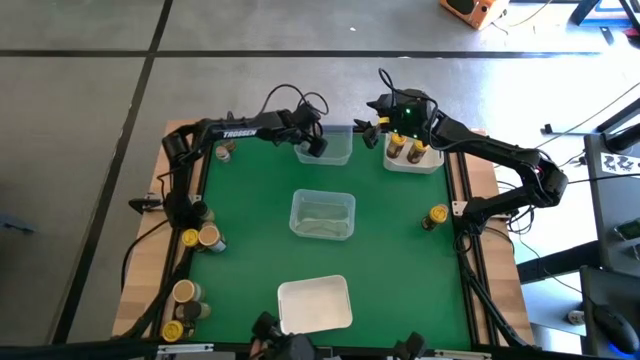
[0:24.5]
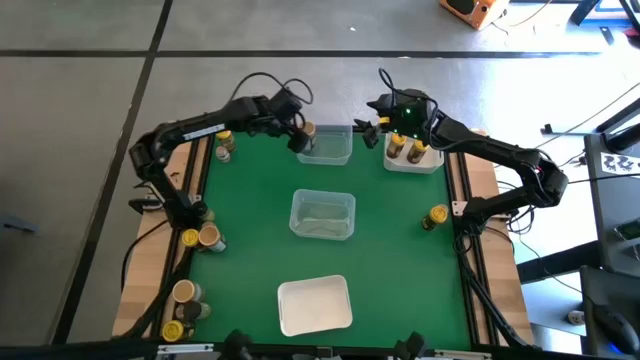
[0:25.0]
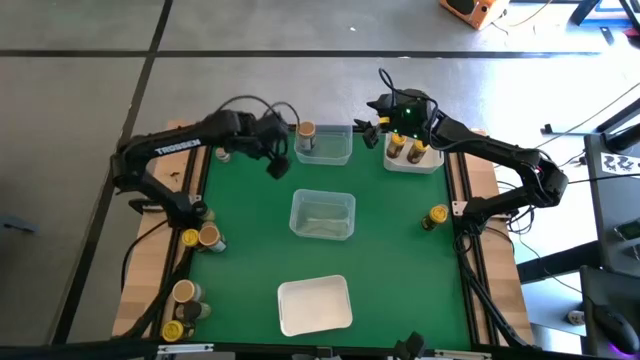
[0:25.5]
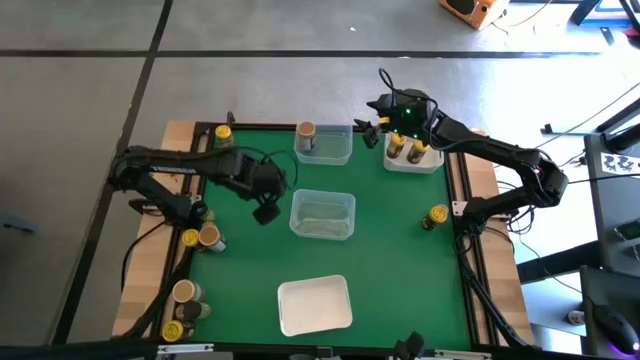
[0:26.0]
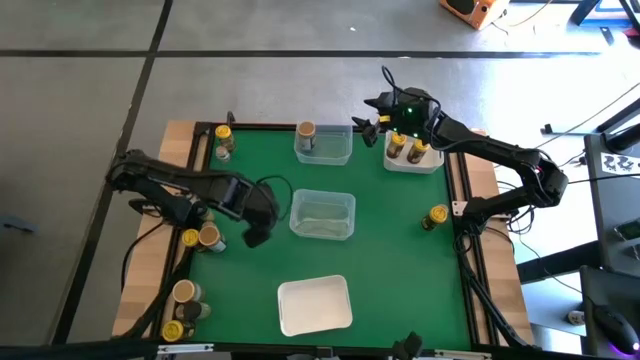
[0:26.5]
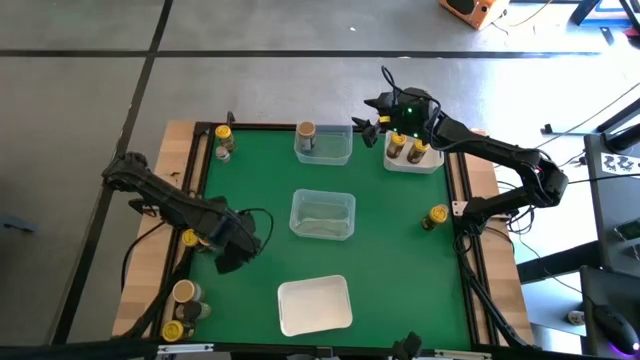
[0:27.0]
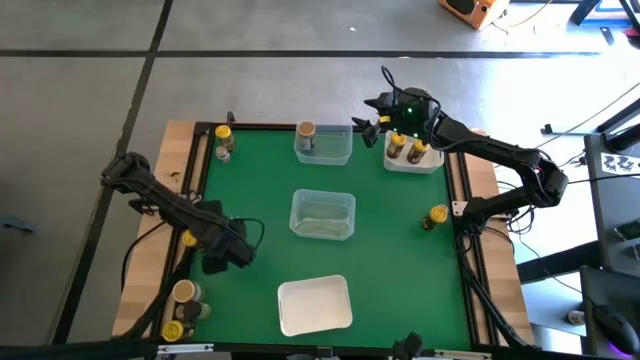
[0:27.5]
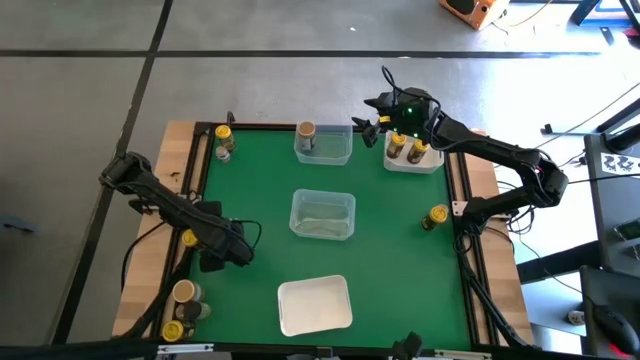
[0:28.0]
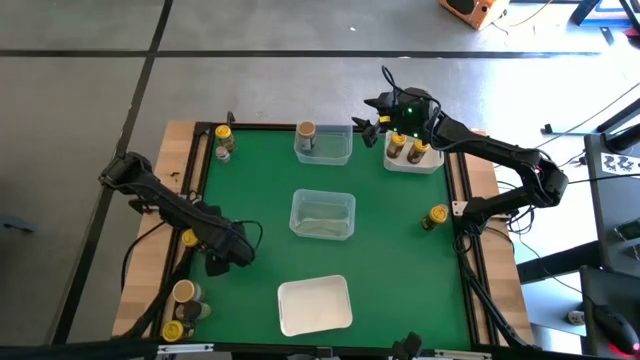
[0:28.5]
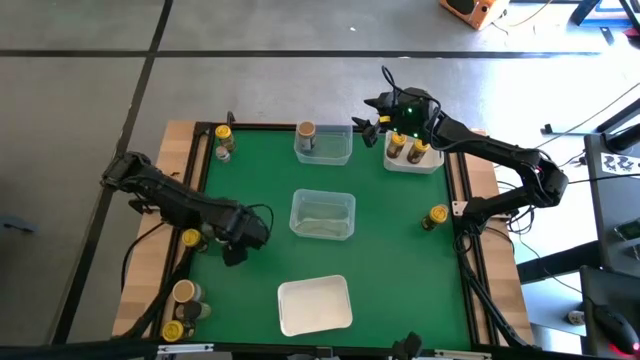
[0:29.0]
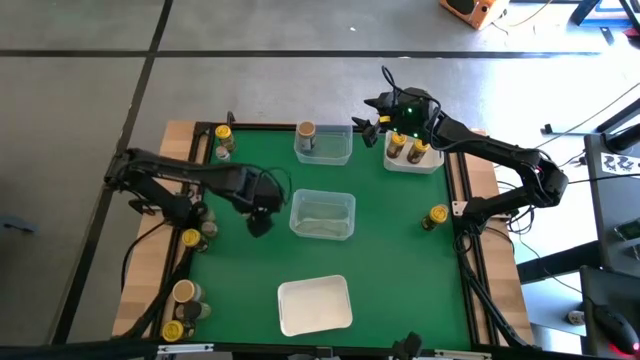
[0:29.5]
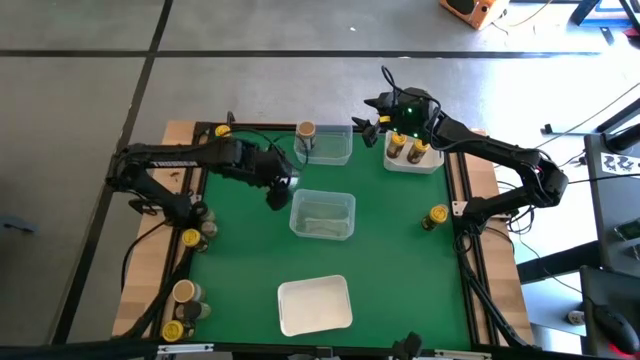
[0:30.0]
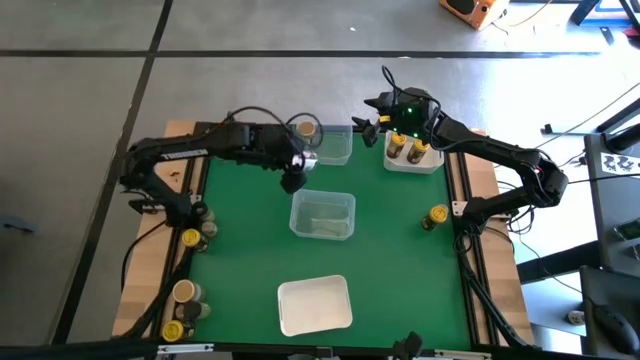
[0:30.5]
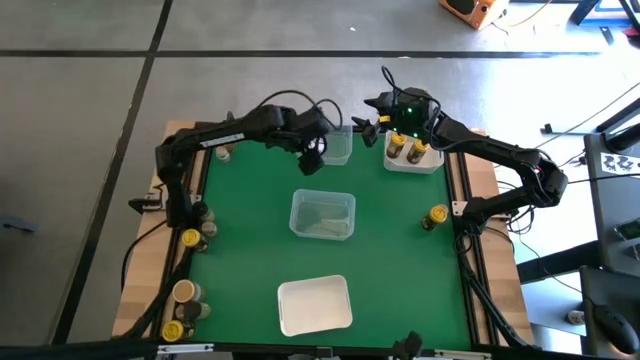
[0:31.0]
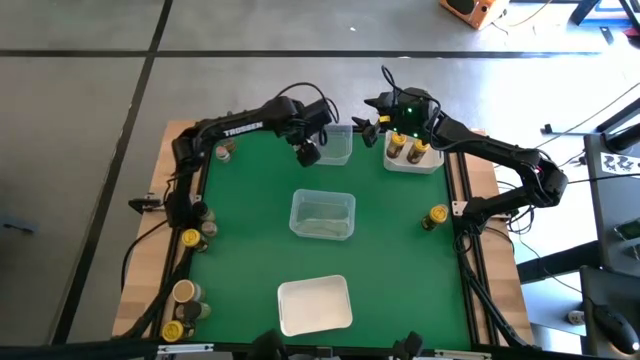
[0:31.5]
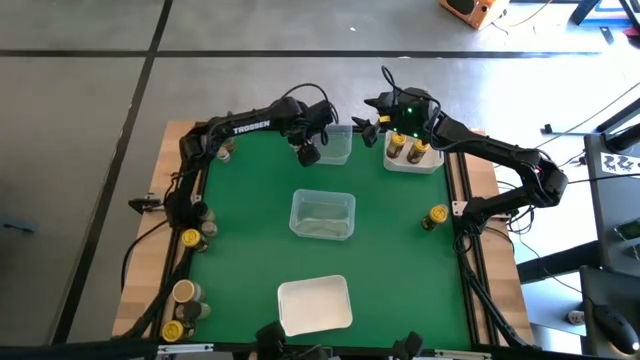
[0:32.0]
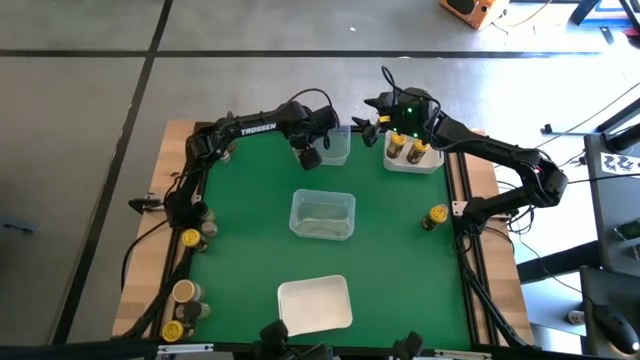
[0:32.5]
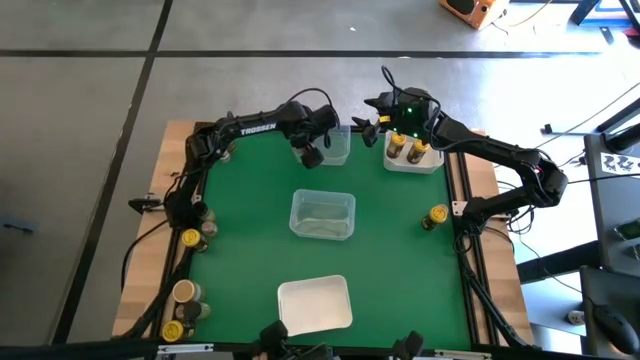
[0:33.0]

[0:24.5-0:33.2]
Task: Sort spices by type
Put the brown seasoning bottle into the top transparent bin

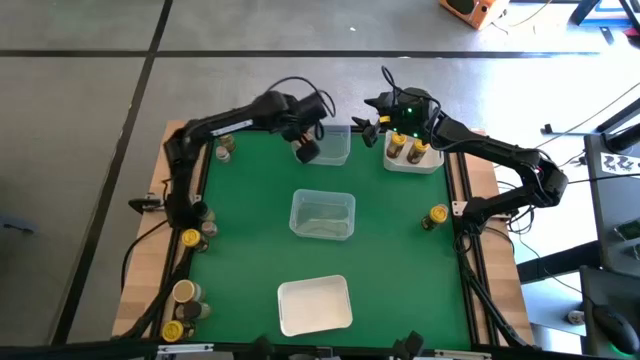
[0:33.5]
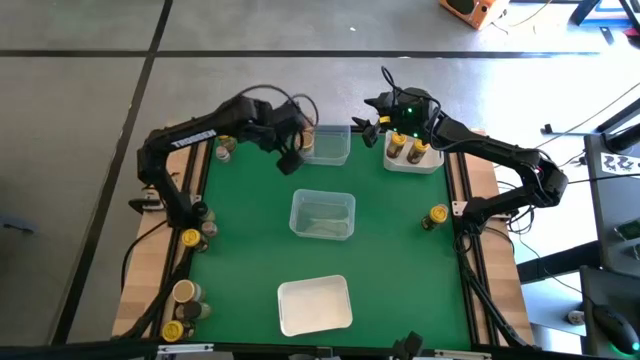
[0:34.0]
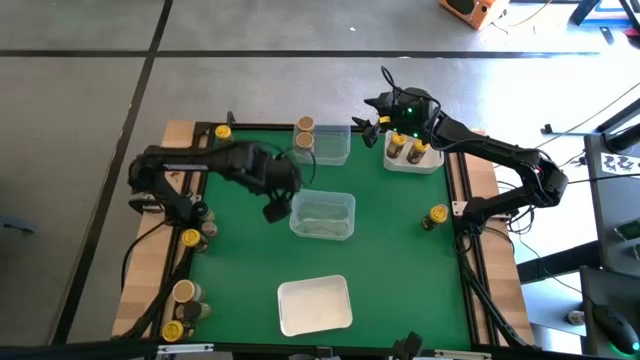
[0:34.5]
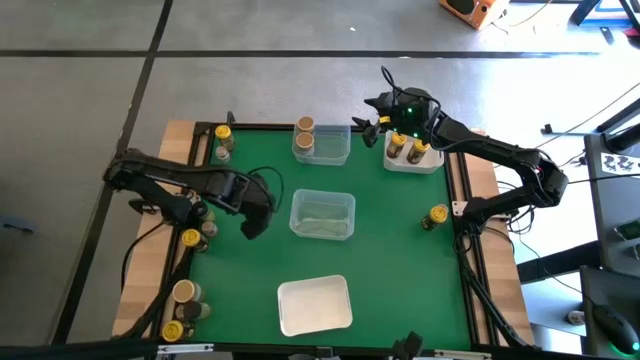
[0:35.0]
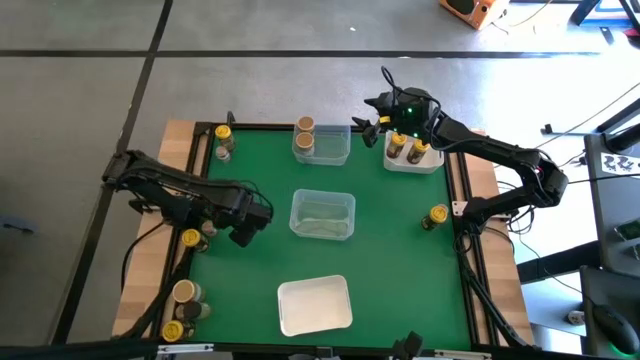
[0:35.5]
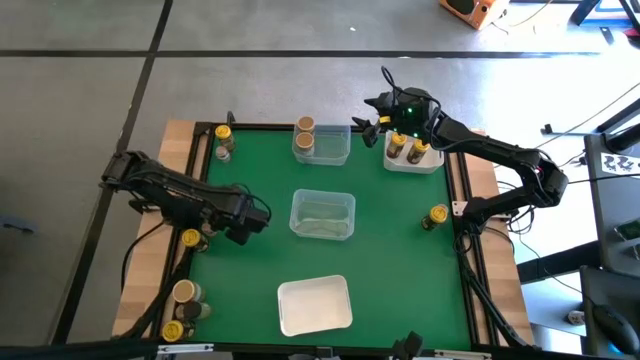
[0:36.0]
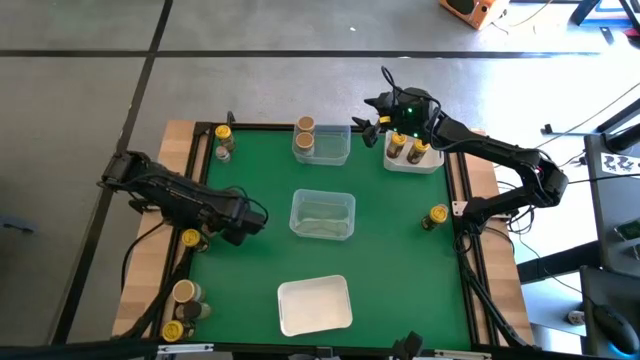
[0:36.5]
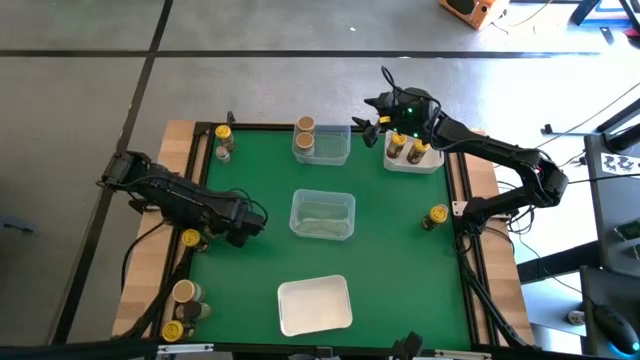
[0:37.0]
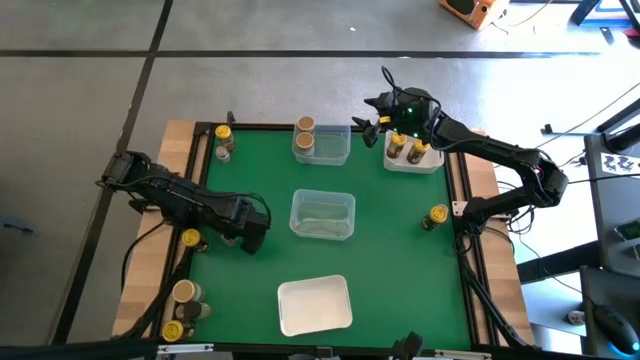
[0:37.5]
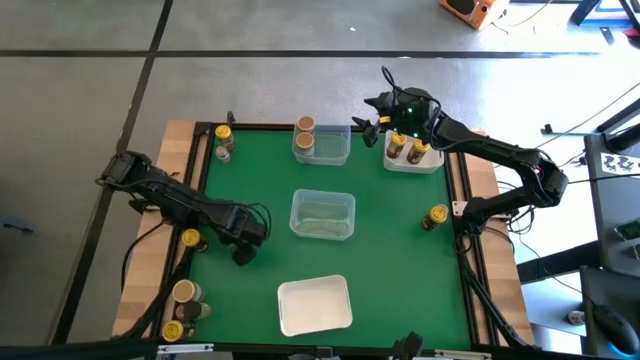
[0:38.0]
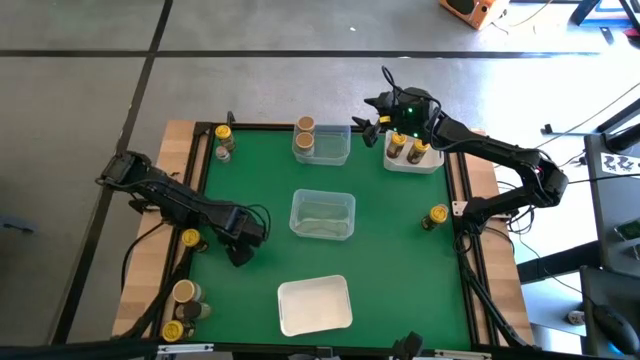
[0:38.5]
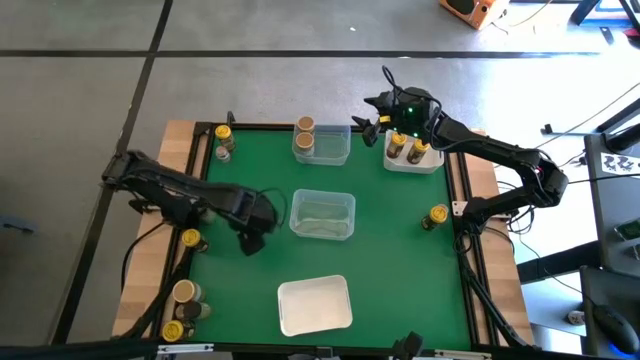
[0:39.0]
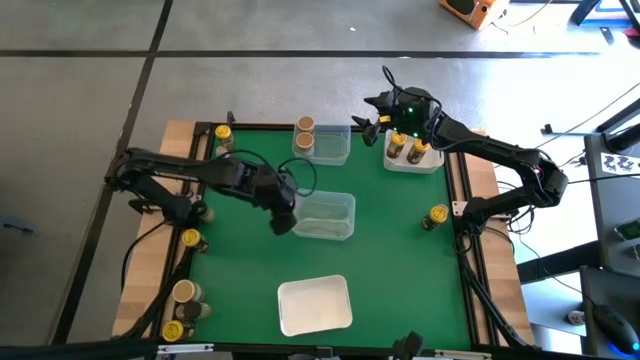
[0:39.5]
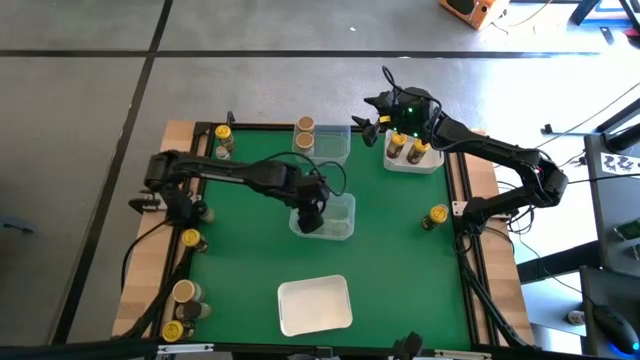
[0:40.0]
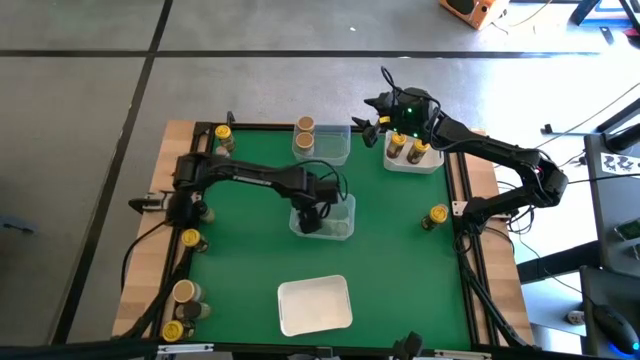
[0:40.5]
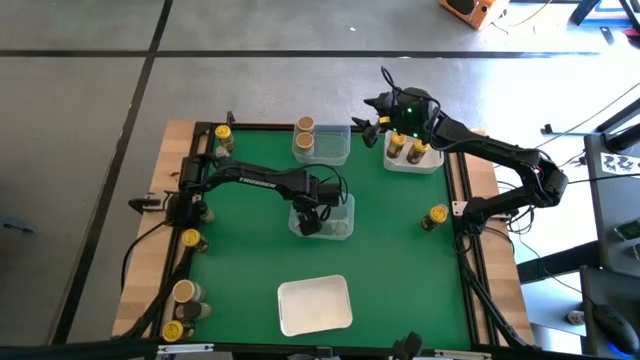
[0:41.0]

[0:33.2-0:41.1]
Put the light brown seasoning bottle into the bottom transparent bin

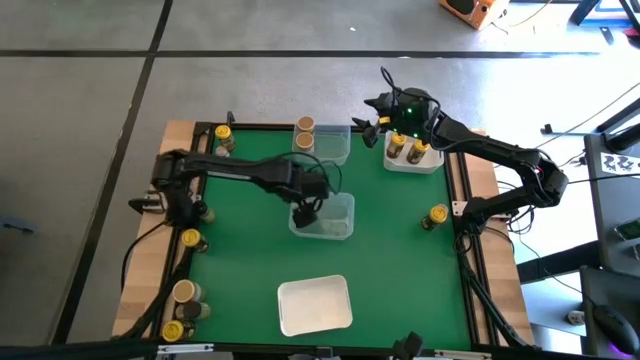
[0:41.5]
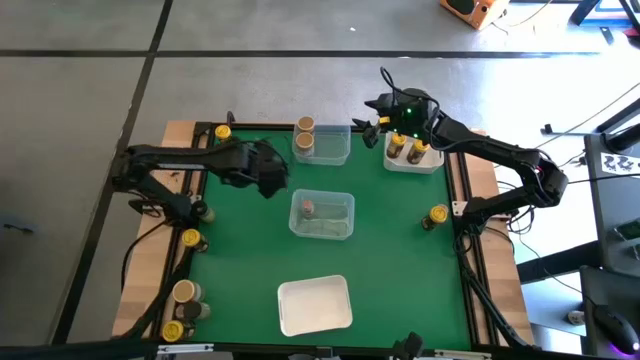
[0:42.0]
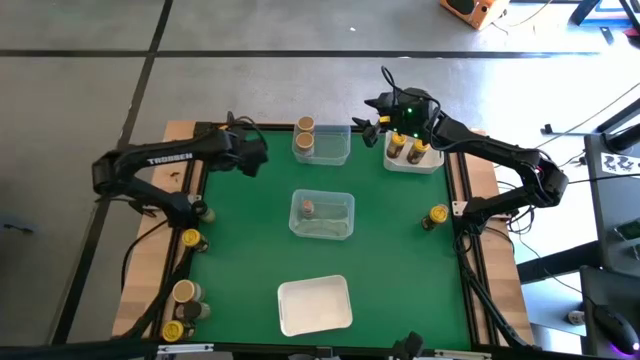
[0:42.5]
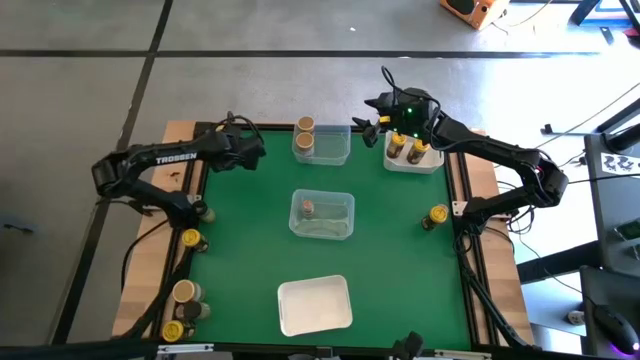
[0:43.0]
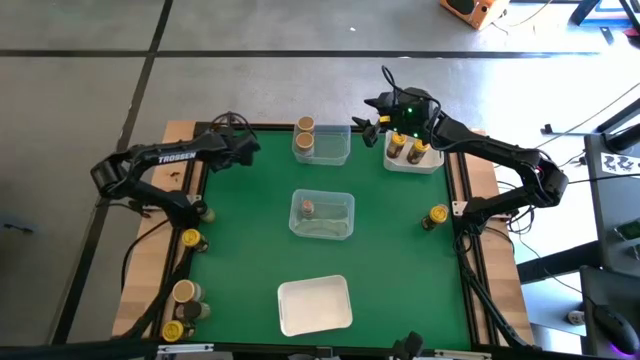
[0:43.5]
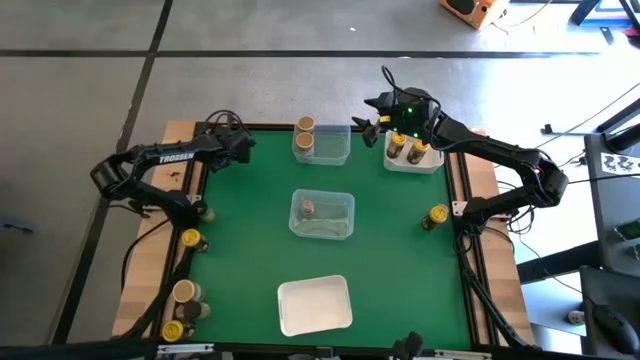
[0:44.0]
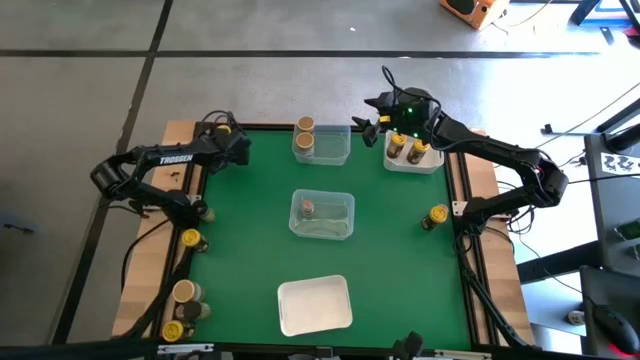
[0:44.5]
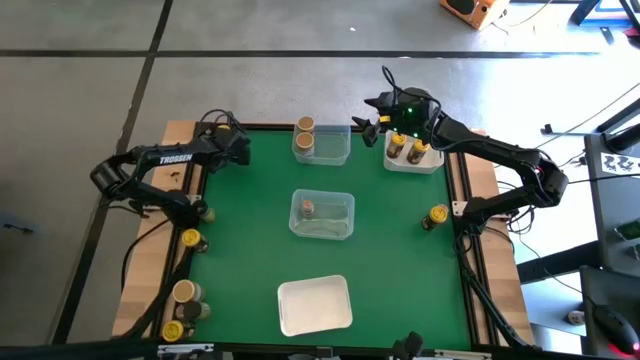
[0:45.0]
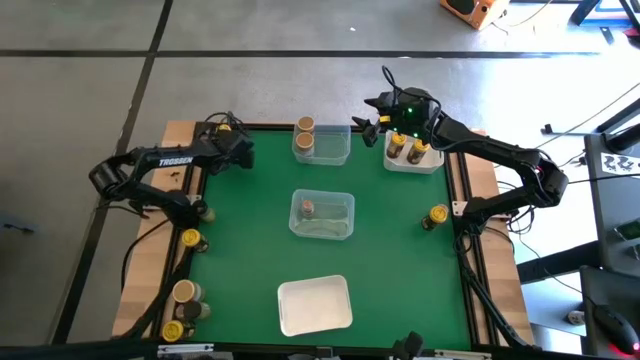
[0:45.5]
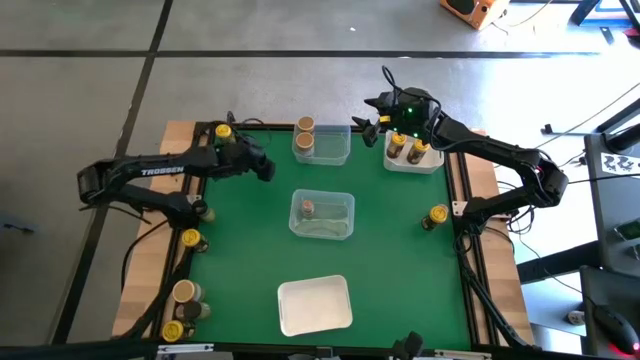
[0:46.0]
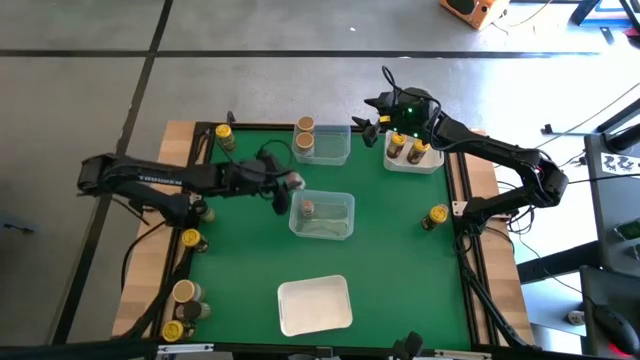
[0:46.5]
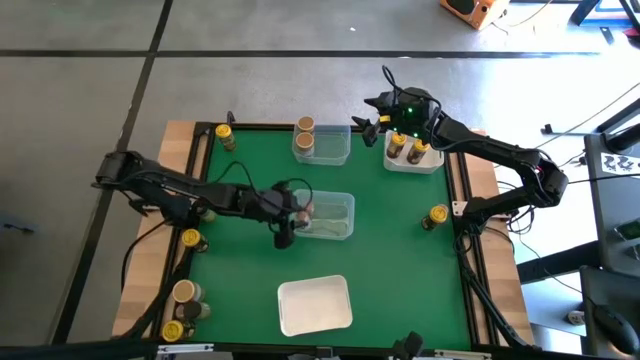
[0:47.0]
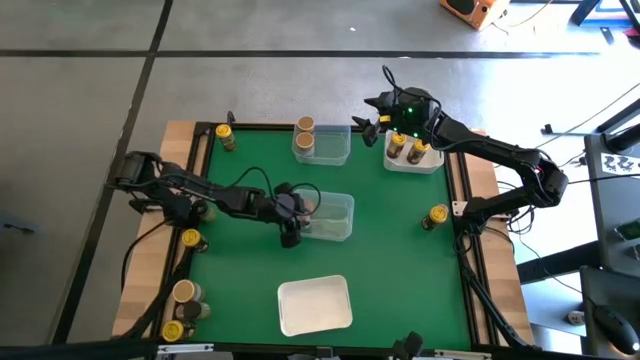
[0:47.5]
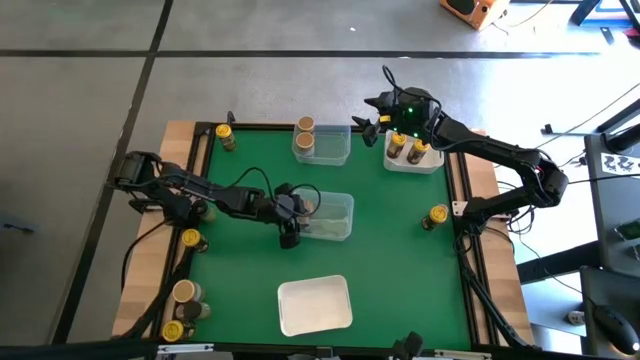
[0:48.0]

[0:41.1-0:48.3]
Put the light brown seasoning bottle into the bottom transparent bin
